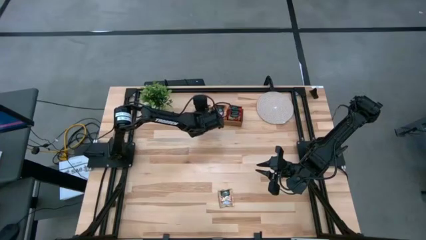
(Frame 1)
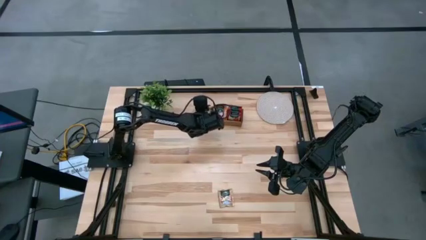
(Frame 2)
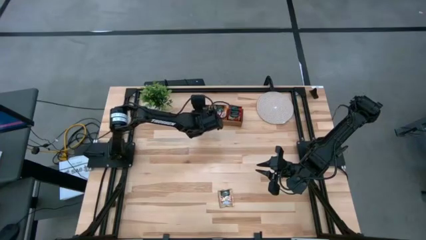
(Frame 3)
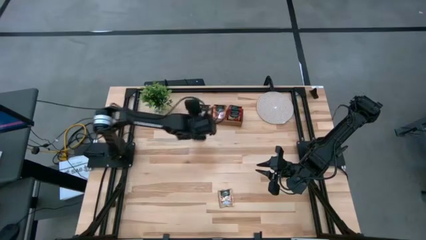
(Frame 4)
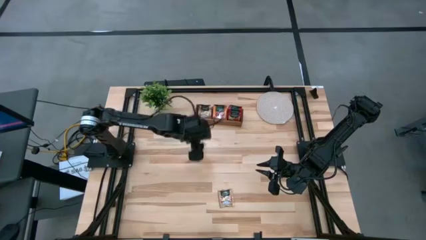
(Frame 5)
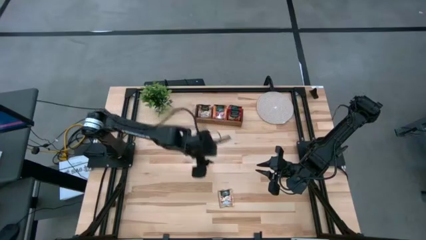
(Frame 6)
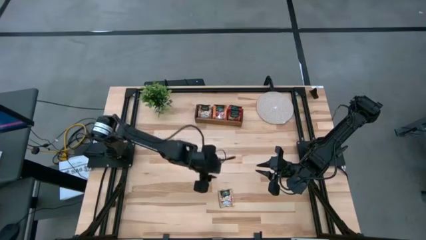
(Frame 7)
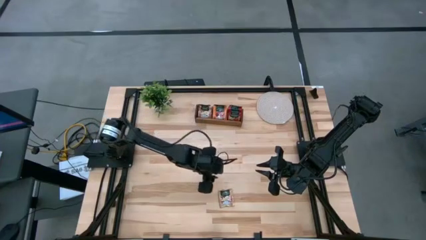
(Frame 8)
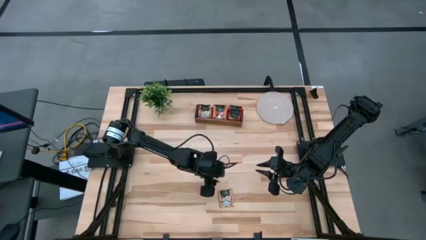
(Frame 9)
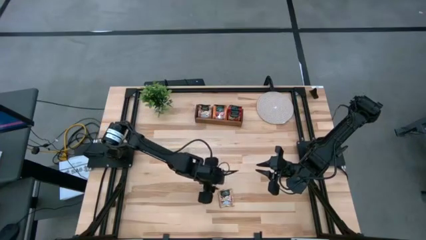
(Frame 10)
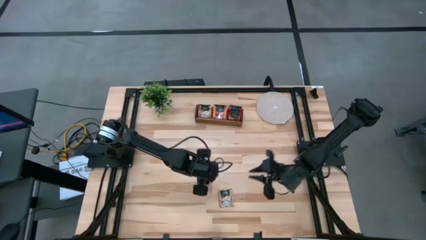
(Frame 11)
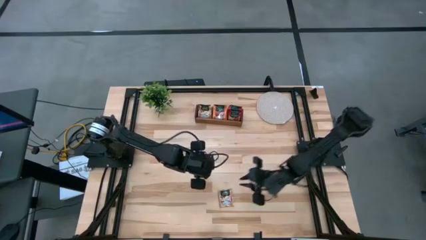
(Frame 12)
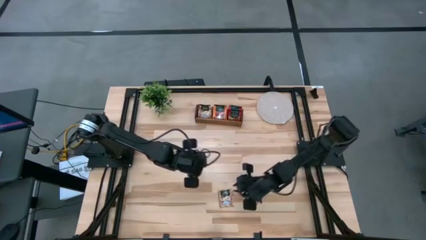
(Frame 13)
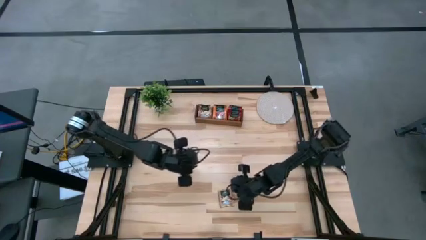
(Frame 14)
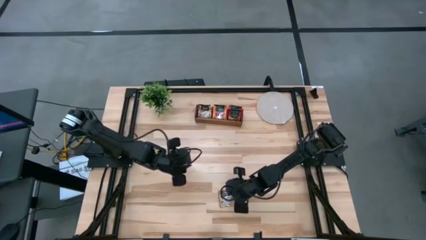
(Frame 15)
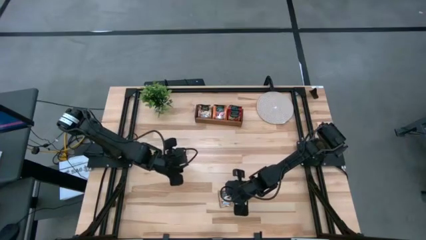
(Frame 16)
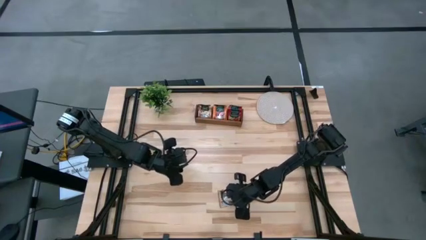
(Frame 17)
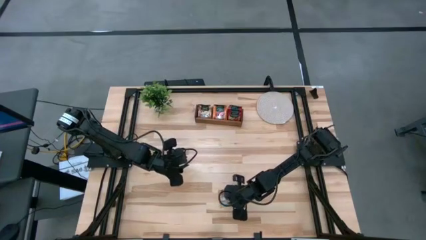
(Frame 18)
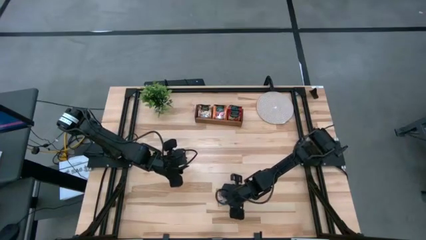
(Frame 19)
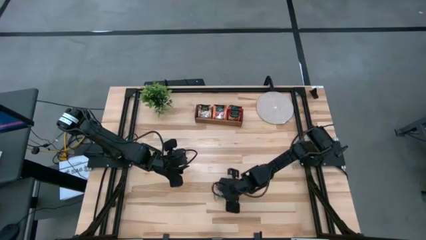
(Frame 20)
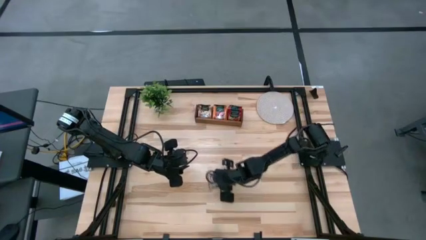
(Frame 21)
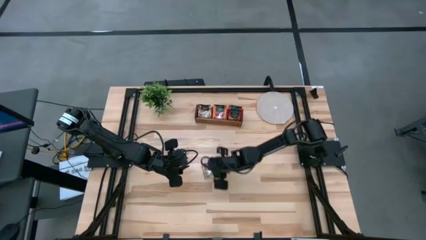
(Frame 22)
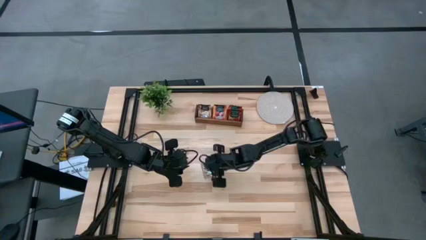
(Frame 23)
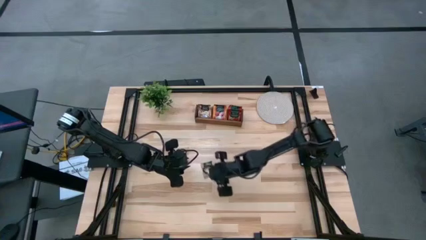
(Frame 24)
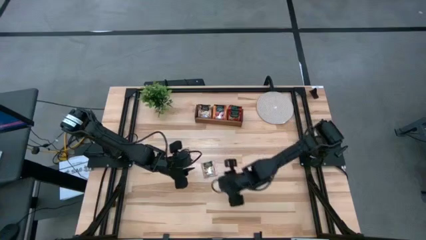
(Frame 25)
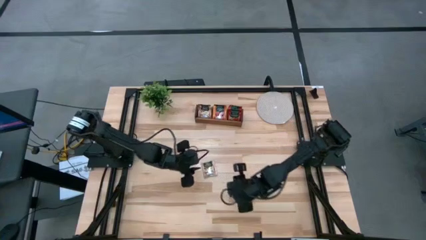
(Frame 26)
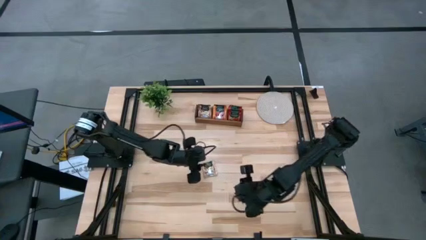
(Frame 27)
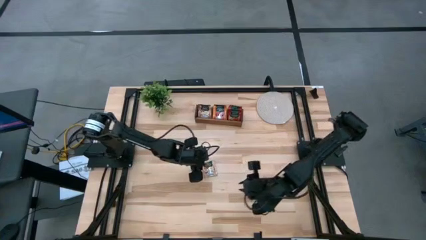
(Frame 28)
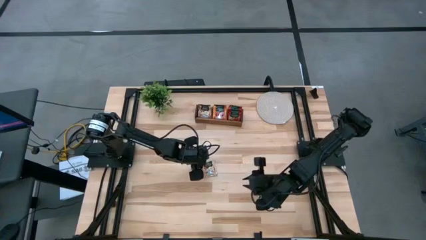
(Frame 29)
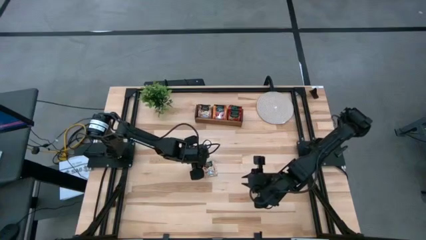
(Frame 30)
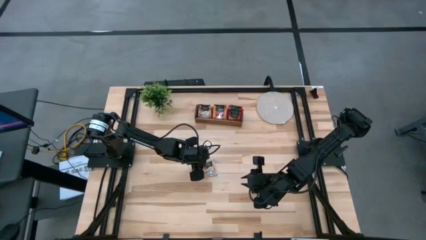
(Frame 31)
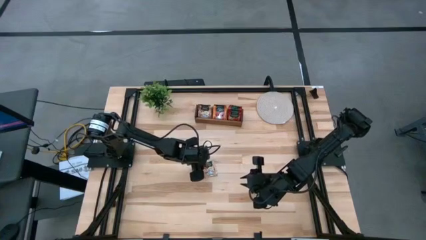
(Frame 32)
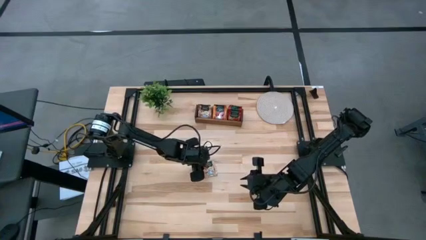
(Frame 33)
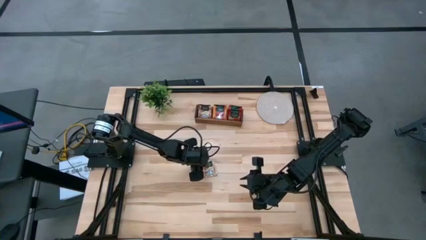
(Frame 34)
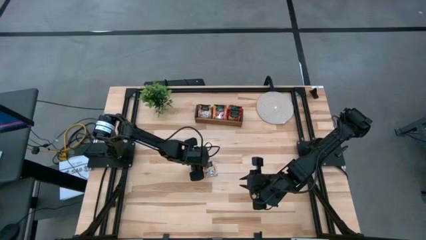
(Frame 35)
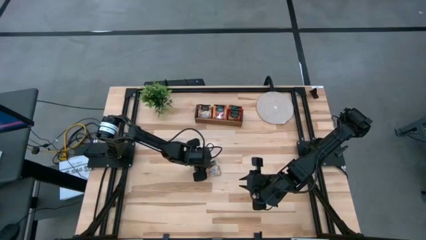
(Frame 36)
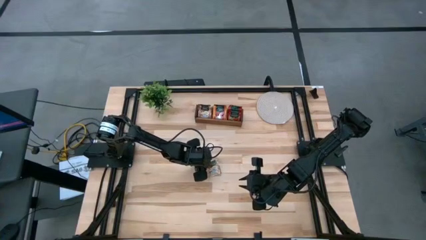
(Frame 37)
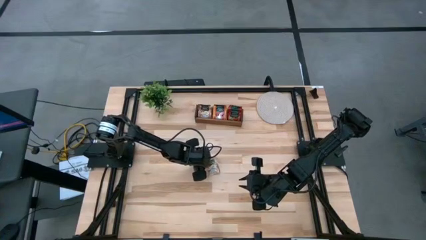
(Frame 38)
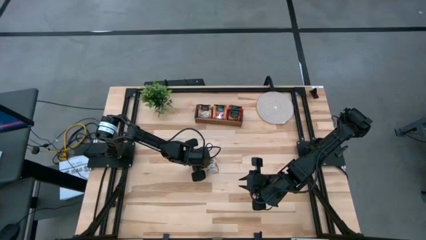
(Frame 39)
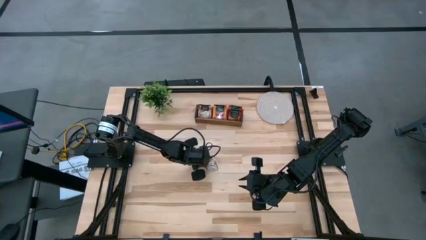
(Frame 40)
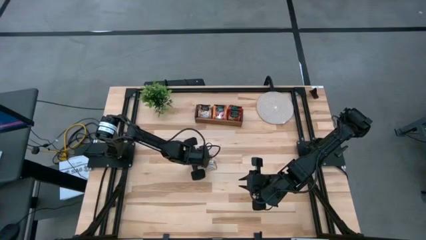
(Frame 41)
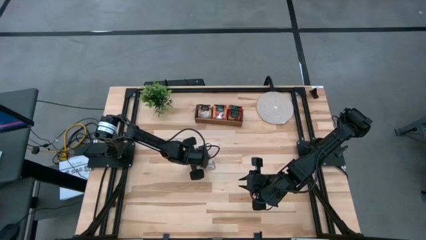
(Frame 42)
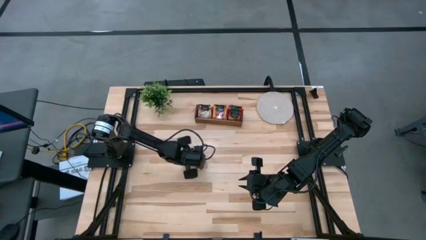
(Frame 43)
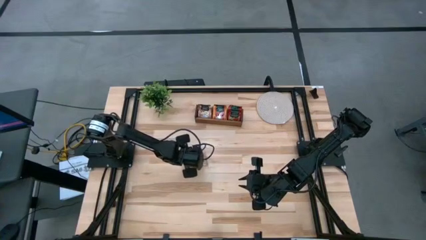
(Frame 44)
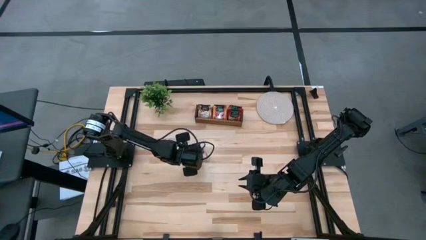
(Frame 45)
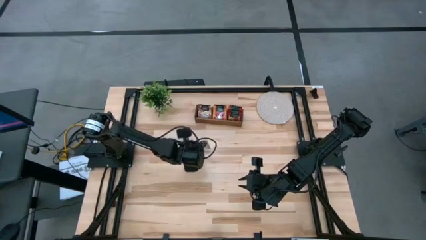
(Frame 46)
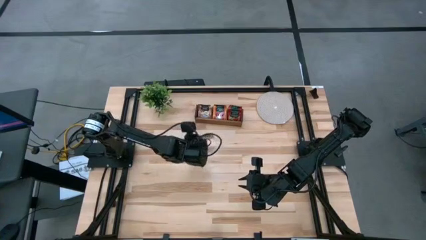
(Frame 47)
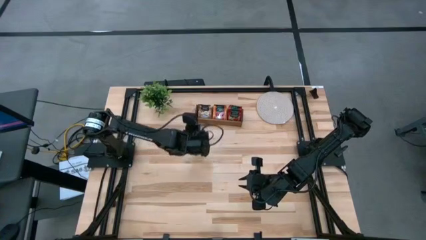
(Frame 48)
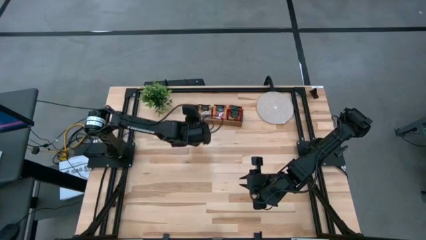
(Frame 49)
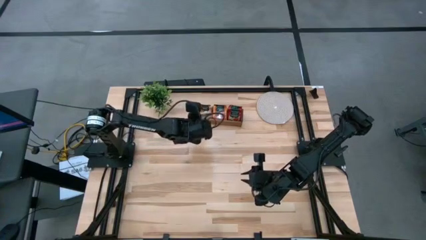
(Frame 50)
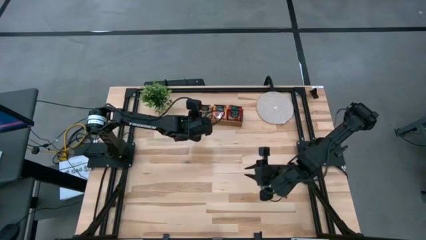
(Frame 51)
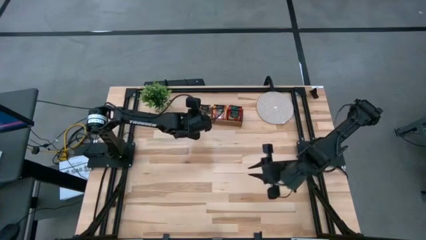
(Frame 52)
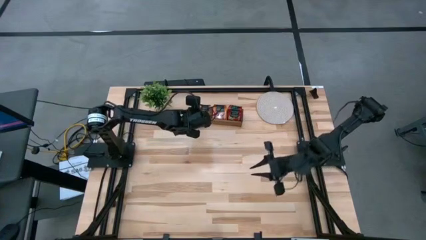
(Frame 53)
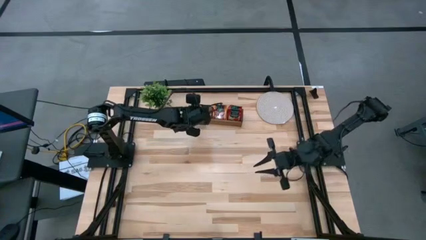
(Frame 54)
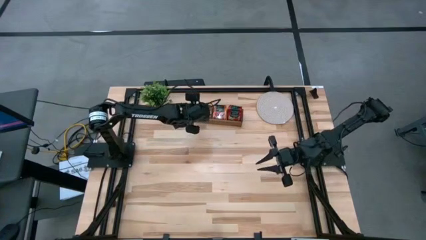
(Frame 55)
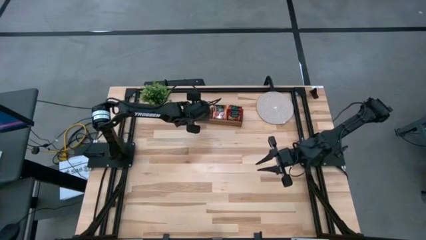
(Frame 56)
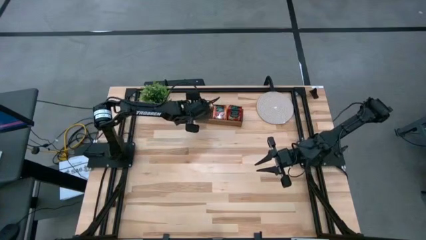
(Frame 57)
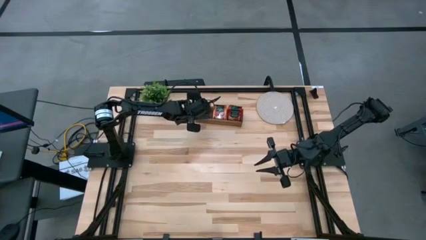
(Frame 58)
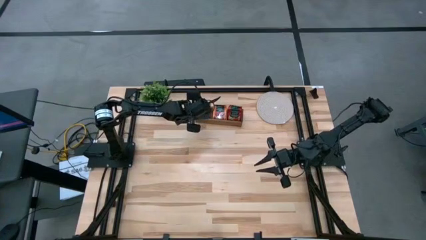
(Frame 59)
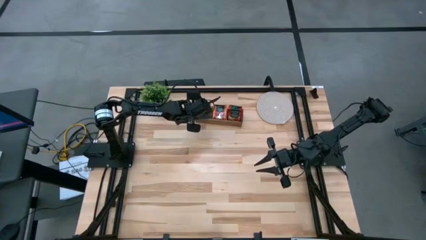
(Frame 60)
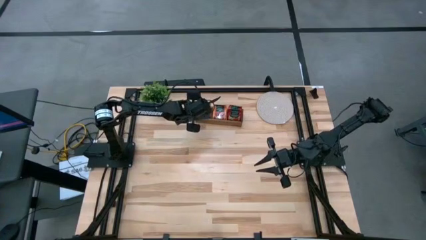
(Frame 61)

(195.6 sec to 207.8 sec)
Task: Pick & Place Tea
Put the brown tea bag into the left section of the wooden organizer

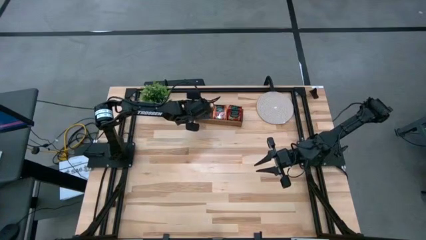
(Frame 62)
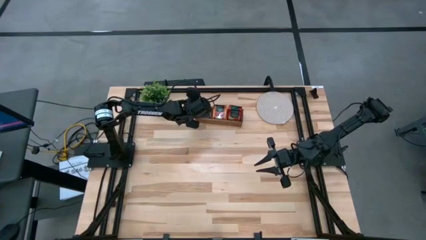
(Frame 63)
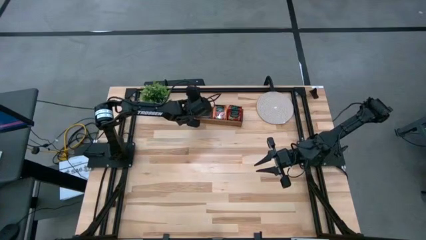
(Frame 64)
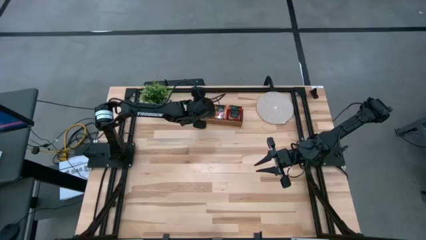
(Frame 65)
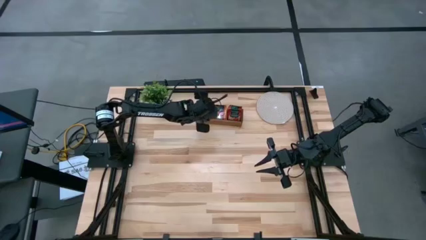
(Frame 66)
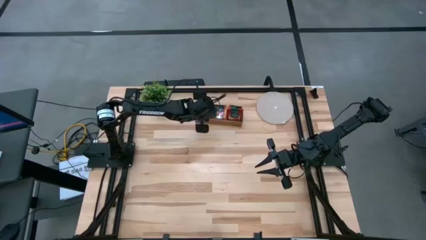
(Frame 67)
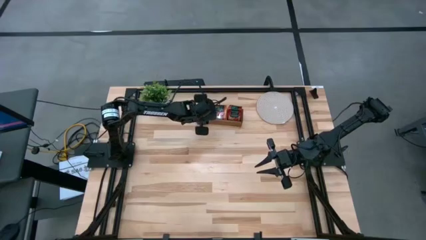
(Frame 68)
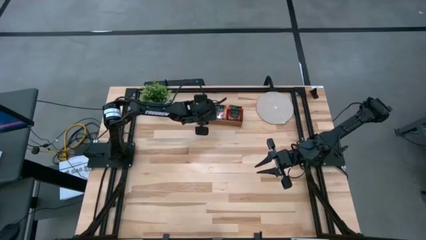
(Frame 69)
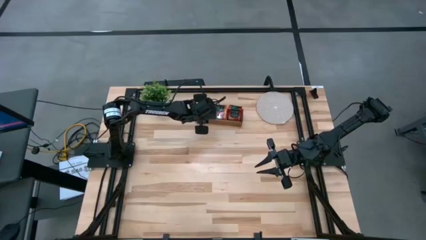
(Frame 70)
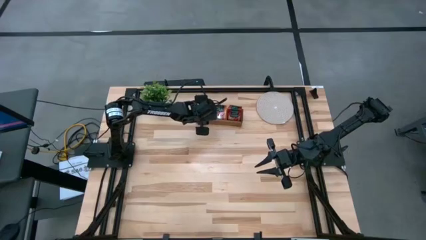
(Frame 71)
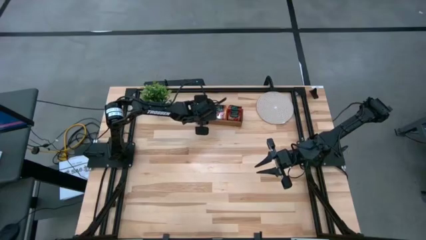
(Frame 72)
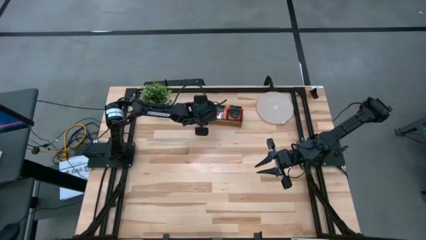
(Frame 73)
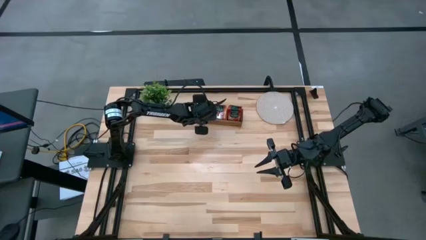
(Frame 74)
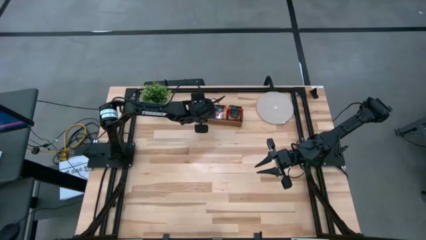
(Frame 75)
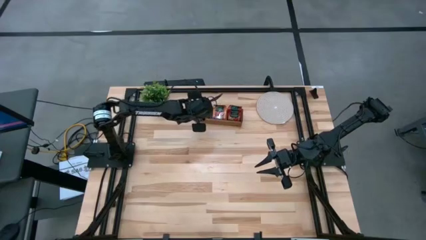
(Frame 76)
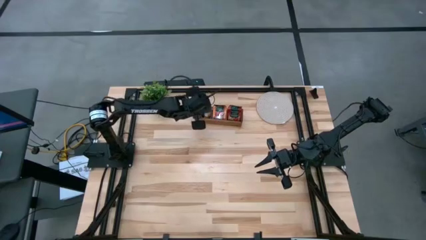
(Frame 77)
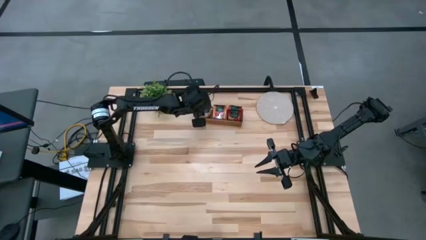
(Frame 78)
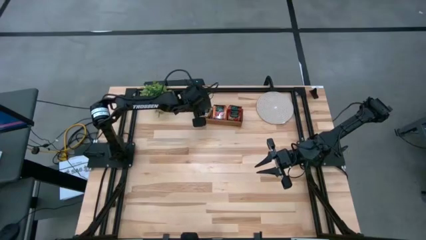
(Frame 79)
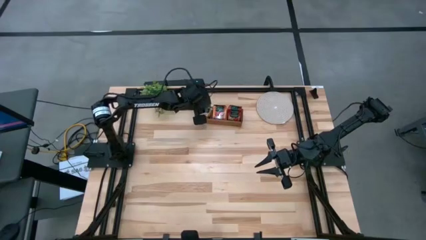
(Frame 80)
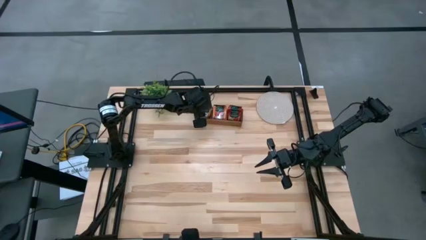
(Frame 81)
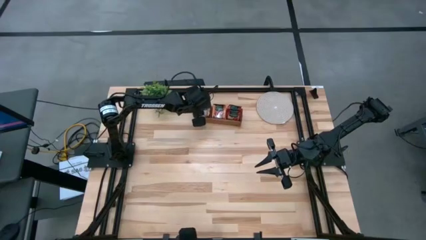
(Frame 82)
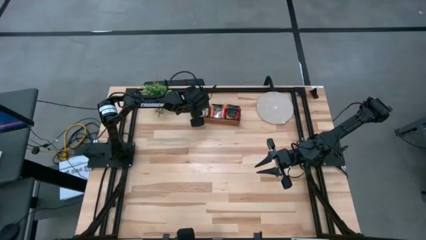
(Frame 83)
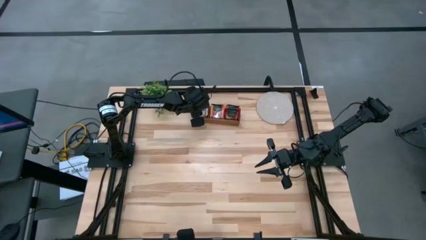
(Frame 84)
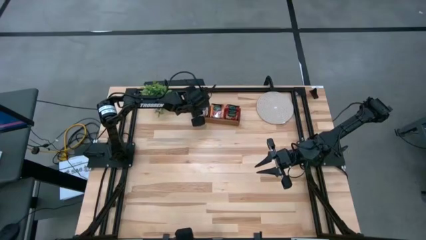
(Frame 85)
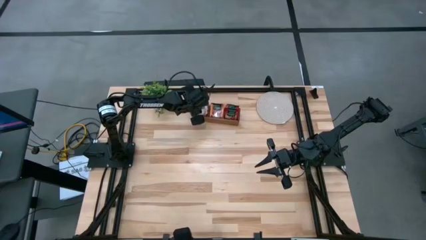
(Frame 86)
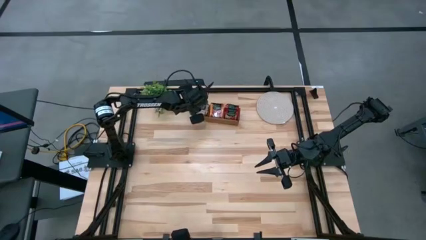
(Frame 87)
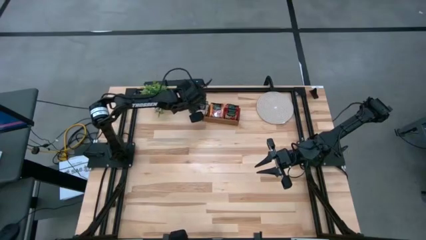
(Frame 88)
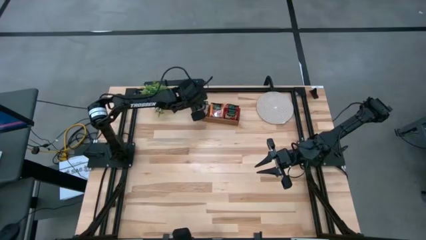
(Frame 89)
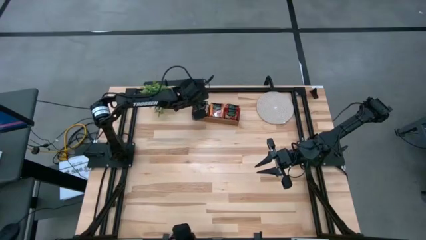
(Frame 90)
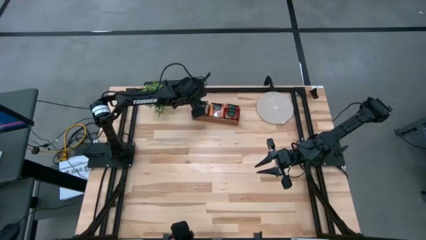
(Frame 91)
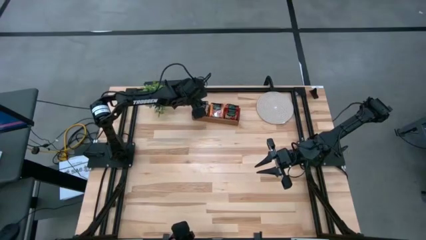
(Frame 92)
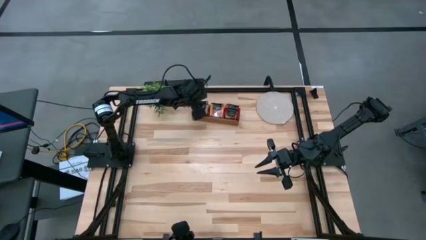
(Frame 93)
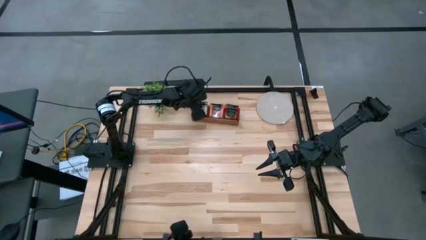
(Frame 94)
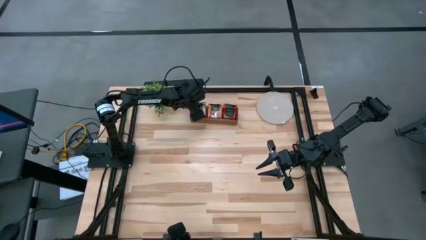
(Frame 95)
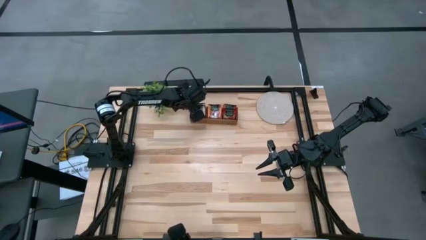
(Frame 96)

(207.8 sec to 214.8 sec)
Adjust the brown tea bags in the left section of the wooden organizer
